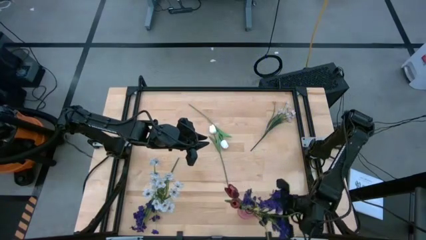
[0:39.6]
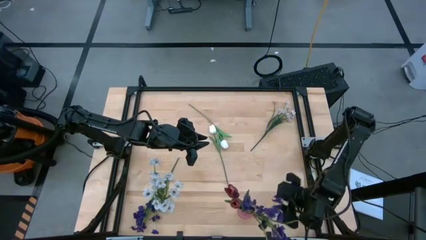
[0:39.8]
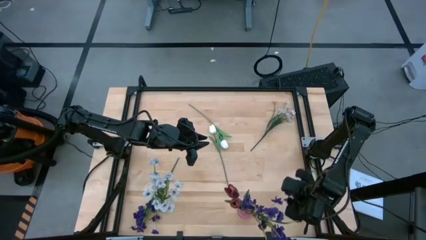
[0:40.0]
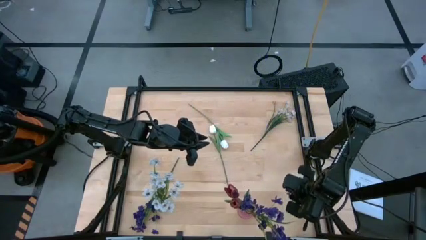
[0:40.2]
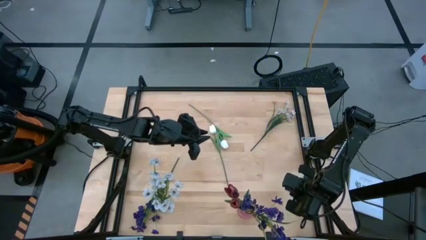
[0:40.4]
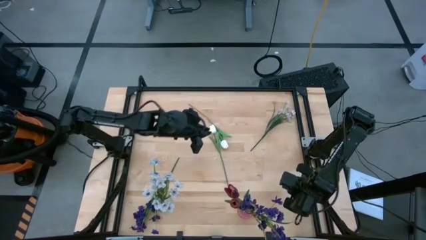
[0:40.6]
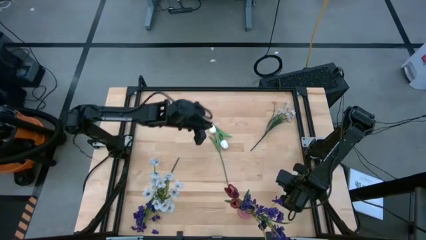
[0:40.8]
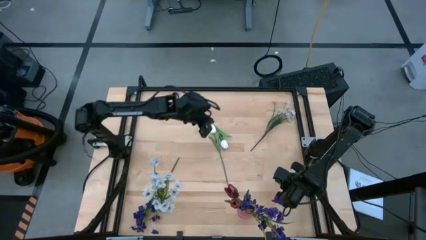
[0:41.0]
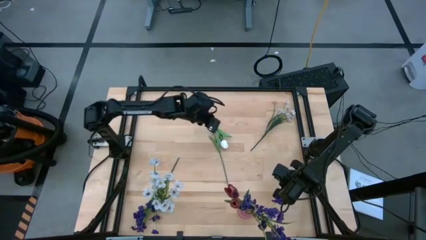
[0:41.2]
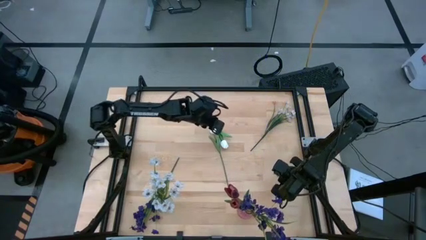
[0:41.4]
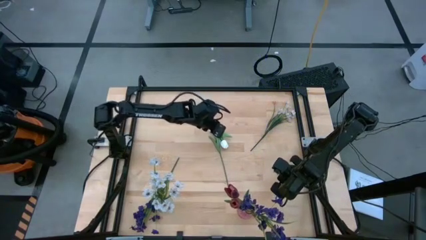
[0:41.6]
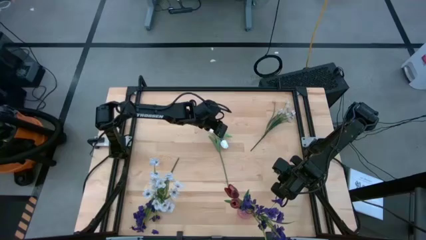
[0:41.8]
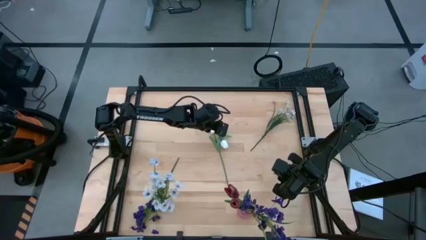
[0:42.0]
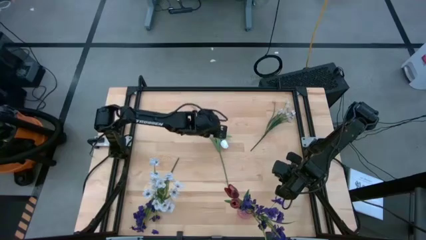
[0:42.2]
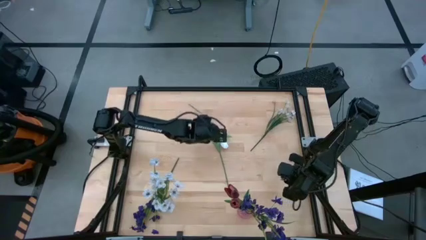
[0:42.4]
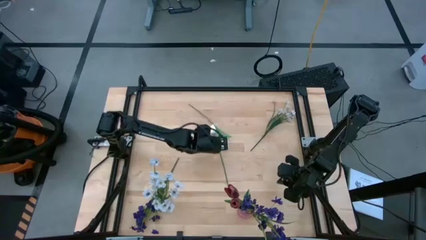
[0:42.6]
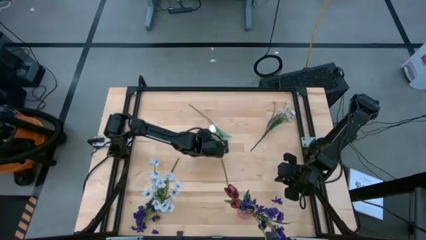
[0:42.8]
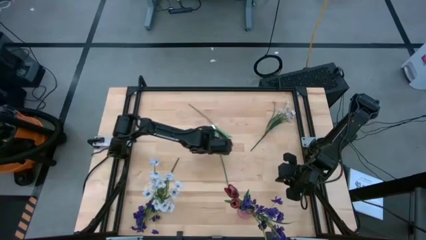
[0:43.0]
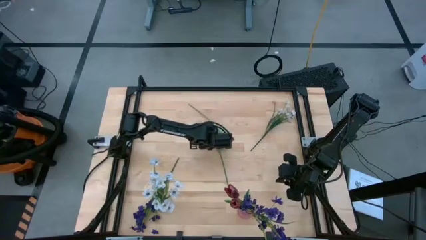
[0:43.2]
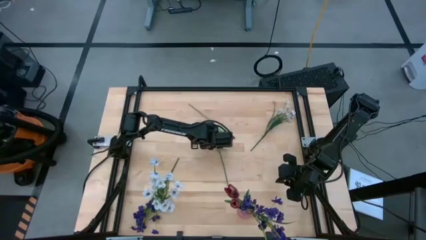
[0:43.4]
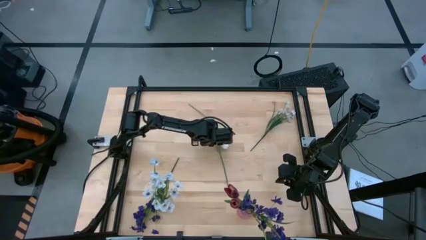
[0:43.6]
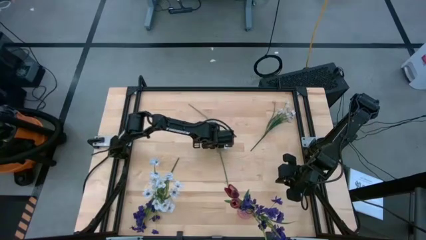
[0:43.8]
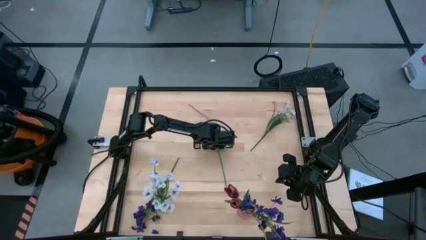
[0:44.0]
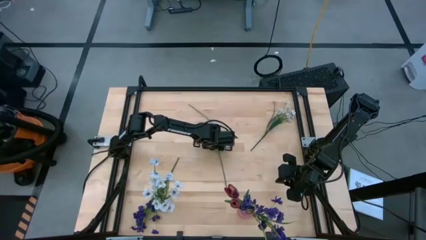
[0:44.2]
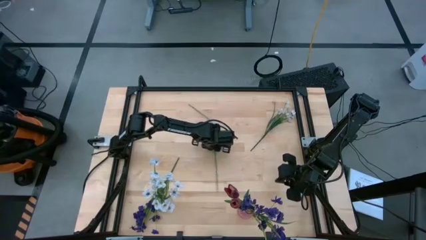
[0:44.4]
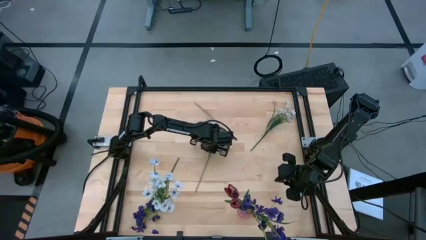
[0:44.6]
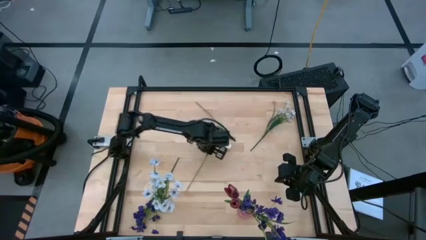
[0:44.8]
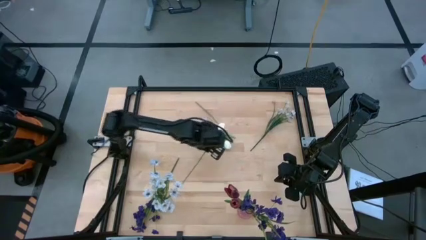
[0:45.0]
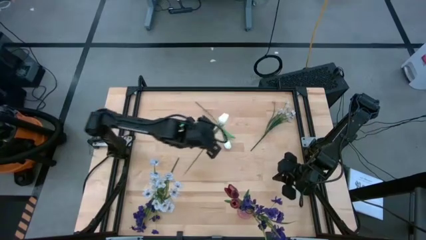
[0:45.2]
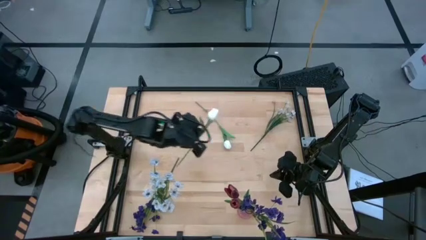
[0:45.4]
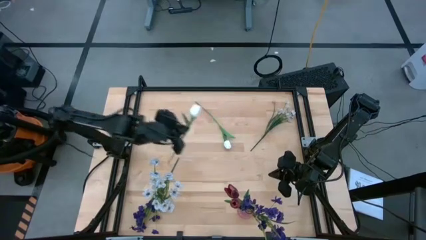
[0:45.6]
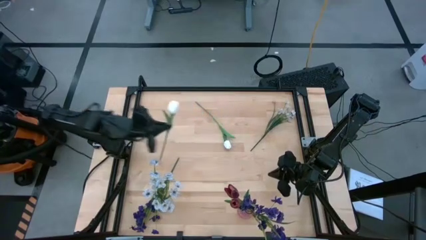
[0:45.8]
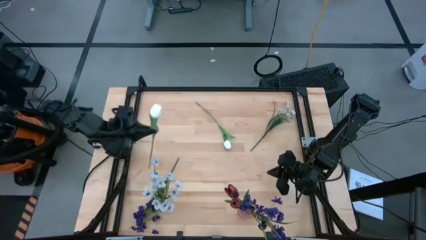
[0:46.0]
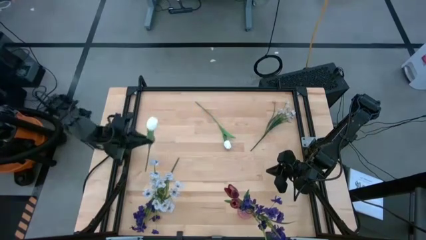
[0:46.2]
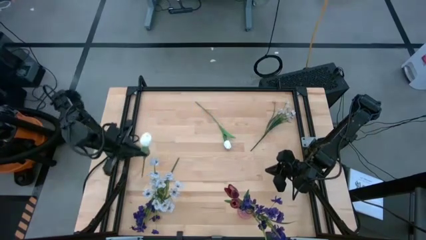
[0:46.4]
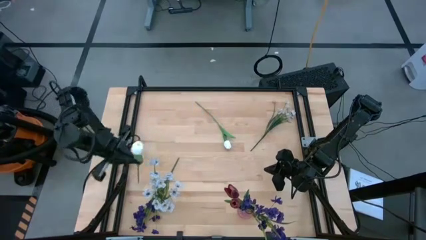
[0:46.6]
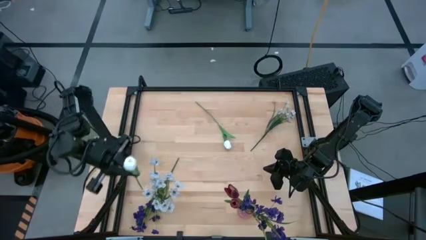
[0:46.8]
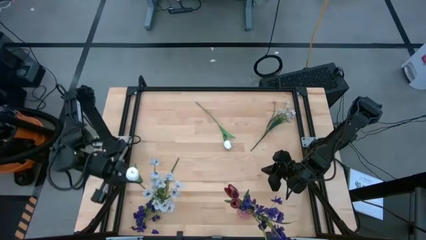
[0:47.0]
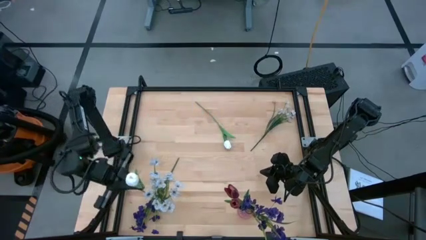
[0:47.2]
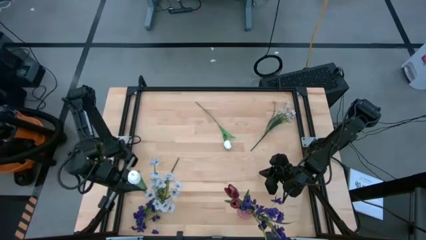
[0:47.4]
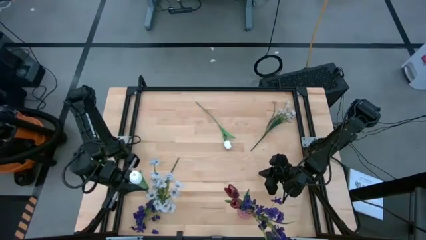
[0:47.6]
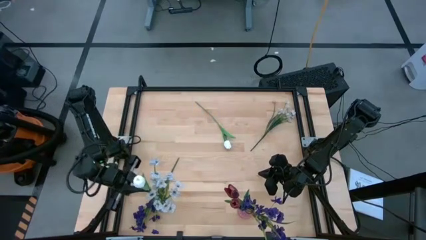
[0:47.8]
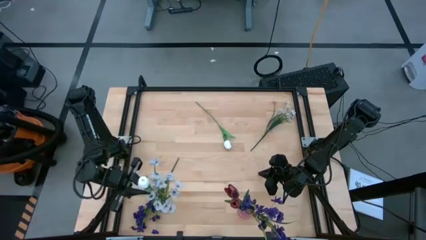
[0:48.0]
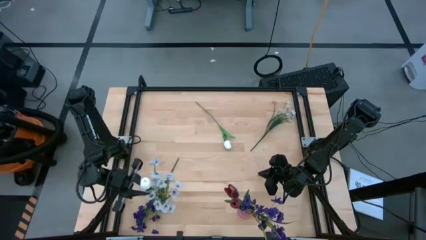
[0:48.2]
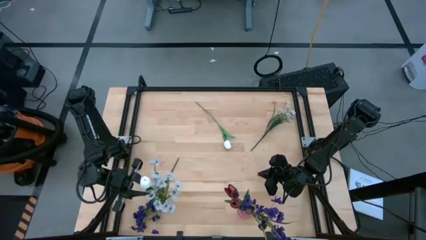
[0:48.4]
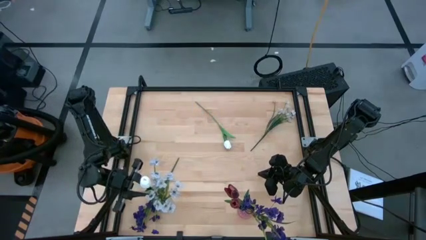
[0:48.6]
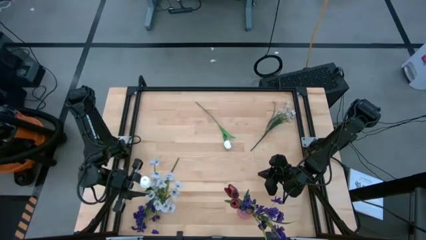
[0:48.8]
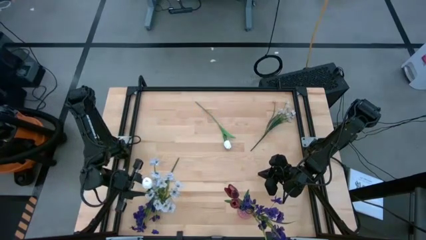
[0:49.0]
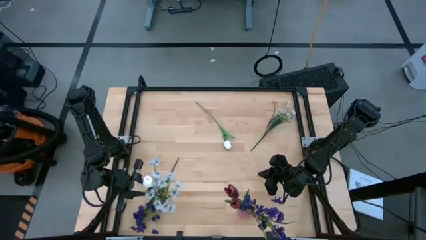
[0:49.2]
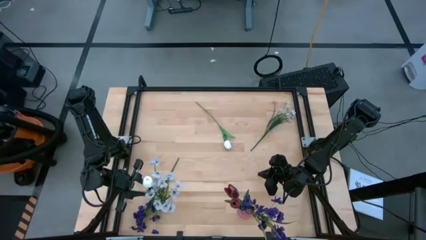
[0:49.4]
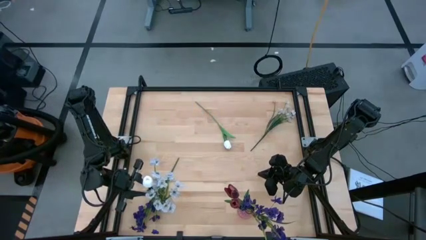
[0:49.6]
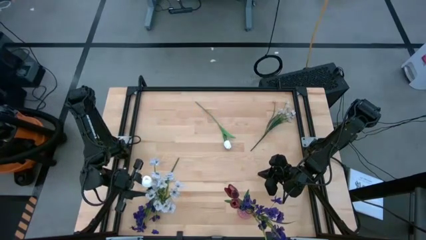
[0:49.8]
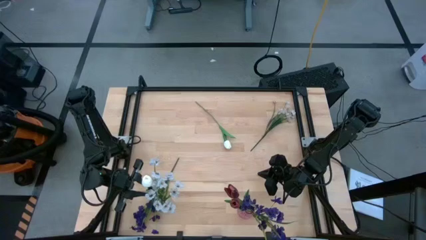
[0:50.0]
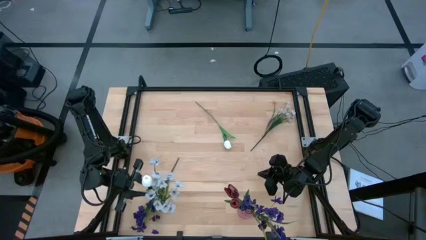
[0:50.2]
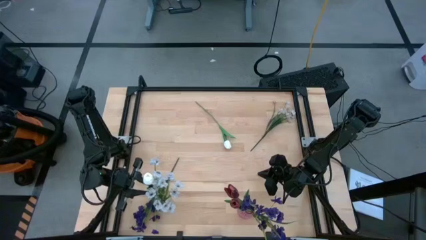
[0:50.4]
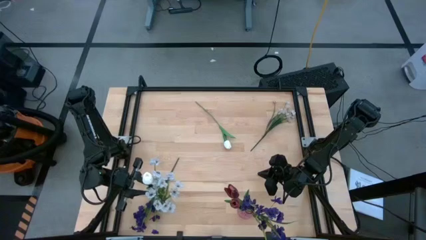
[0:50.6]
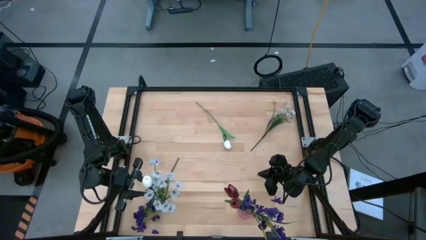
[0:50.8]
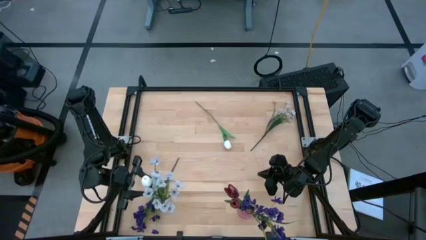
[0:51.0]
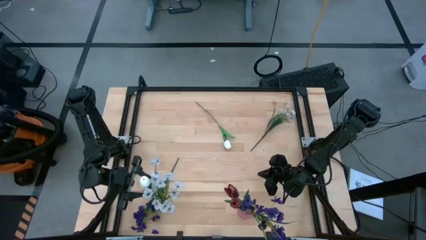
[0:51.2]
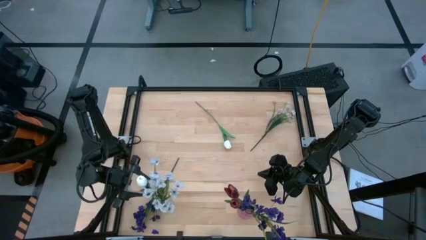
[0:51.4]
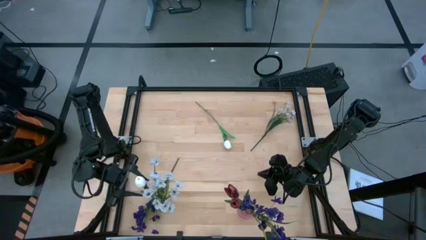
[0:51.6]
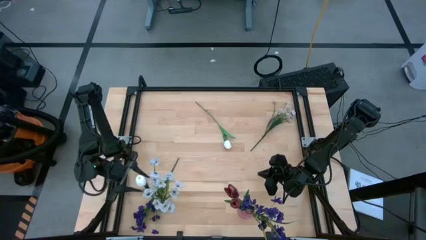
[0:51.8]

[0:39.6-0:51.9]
Task: Sort flowers into vase by color
Put the left white tulip into the transparent vase

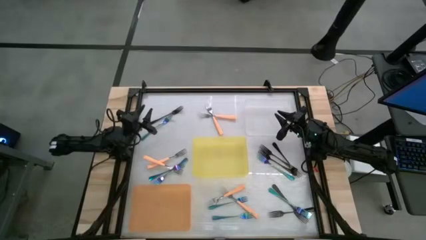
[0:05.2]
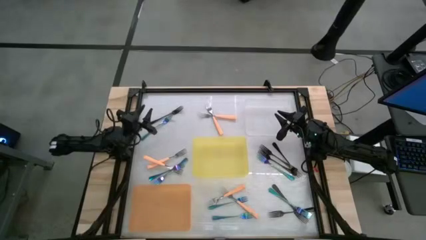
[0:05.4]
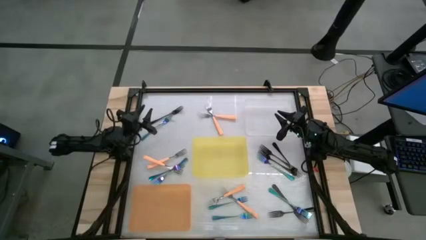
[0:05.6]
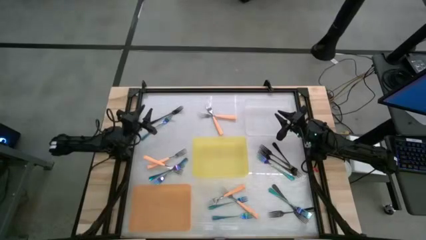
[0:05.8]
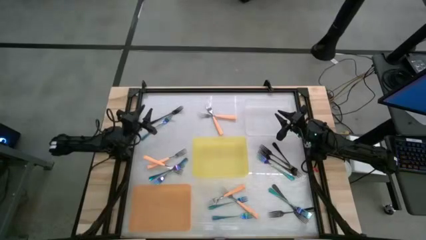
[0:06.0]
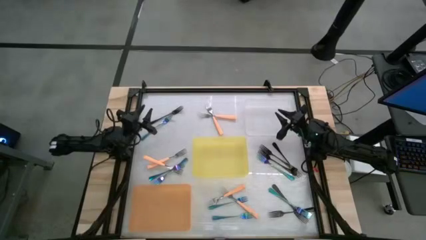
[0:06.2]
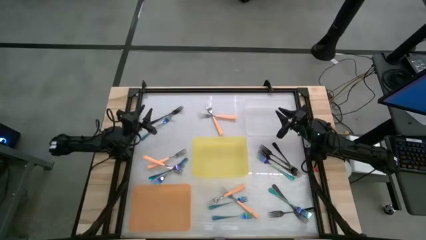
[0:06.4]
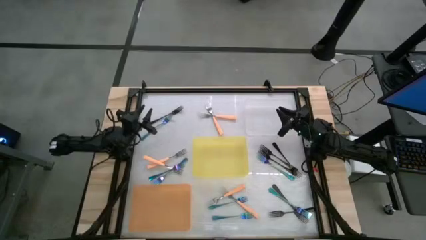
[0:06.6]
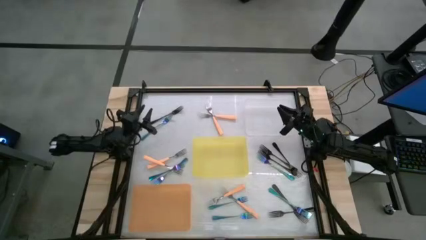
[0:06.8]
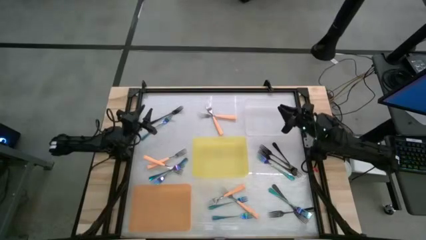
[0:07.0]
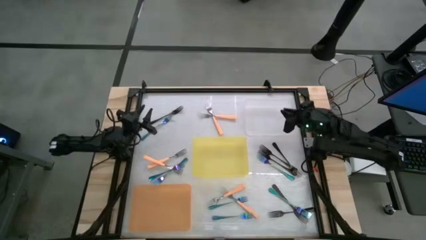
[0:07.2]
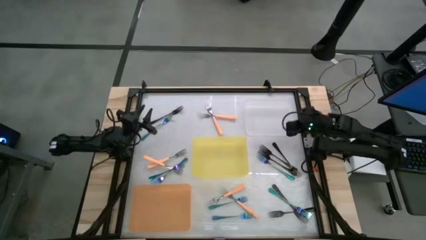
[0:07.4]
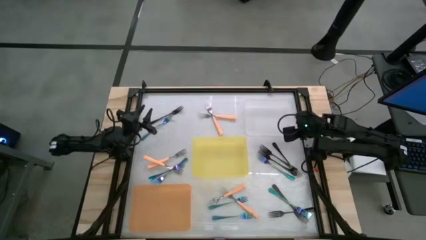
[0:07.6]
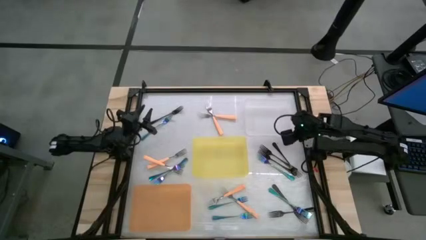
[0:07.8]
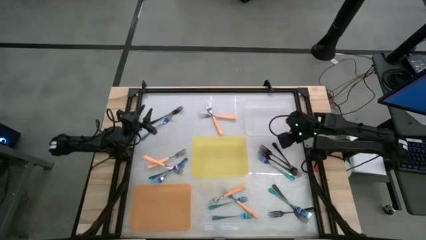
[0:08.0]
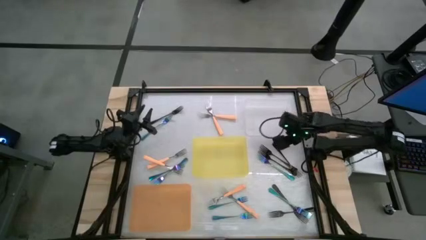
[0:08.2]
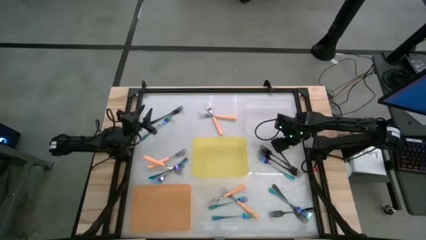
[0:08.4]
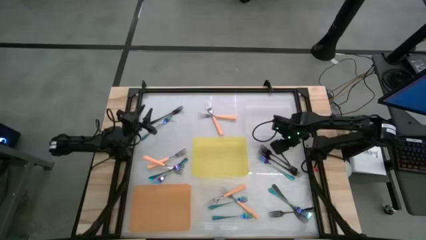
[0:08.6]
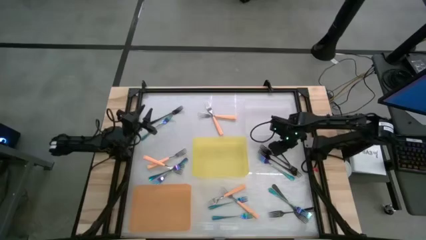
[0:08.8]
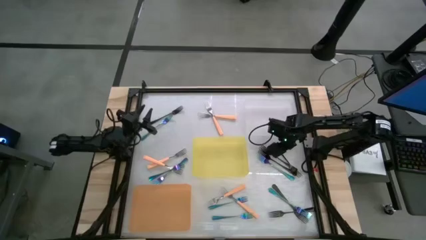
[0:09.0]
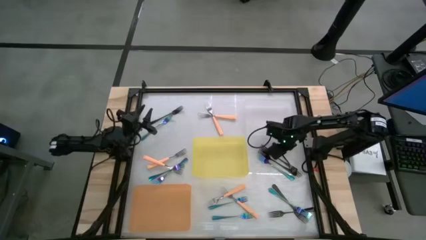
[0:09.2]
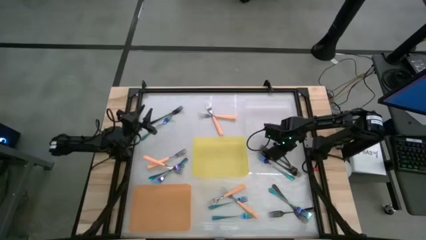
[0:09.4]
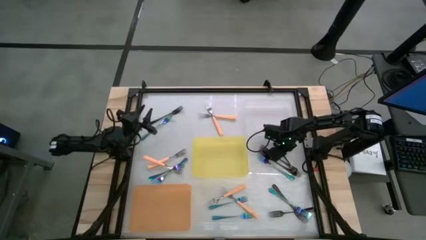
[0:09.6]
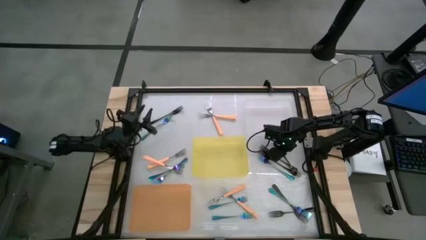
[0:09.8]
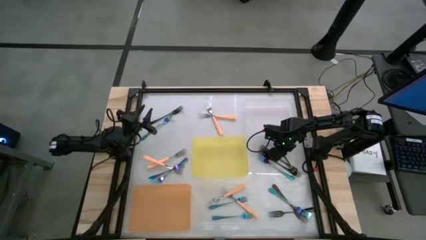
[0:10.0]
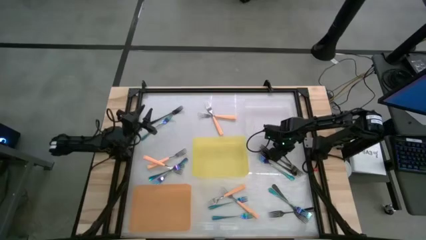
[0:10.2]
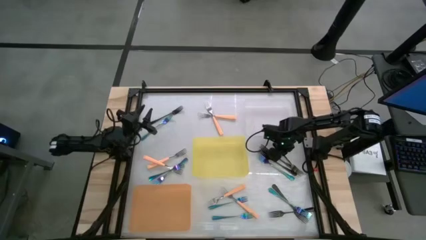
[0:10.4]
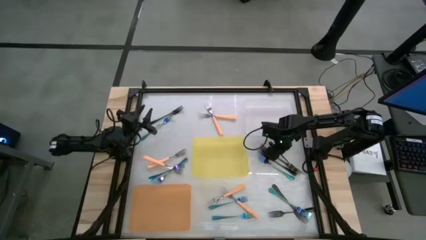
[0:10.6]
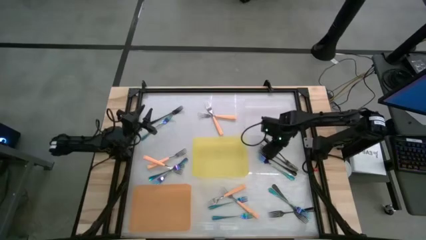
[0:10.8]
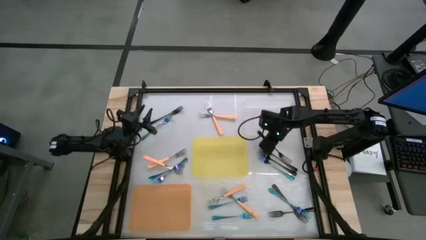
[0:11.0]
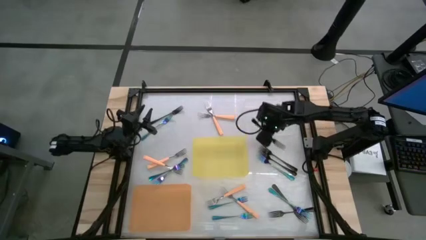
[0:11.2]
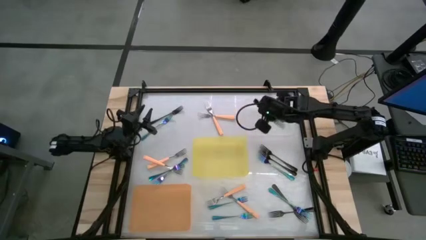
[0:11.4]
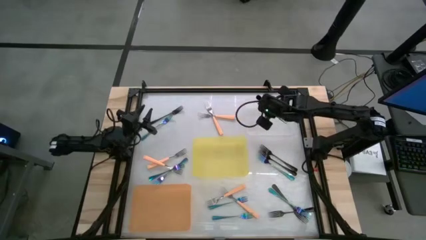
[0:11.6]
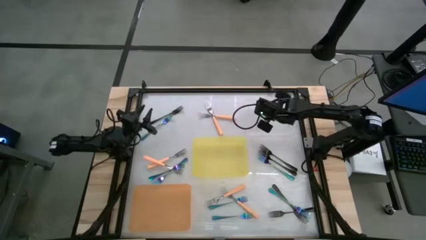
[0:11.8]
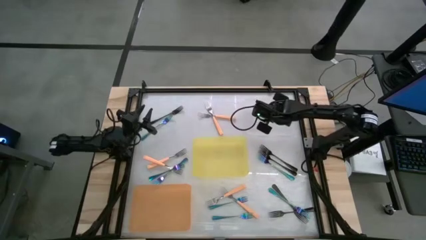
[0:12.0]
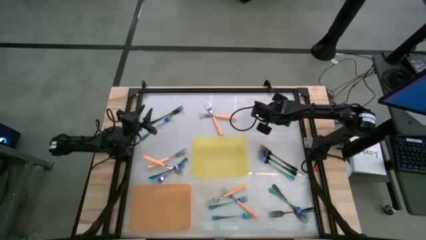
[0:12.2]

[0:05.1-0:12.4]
Task: Sort silverware by color (type)
Put the black fork into the transparent bin
